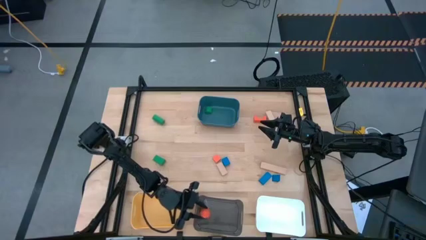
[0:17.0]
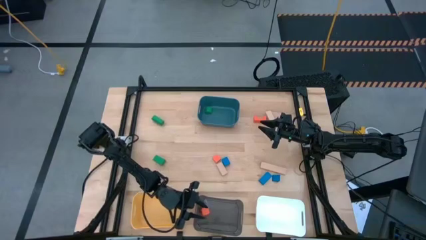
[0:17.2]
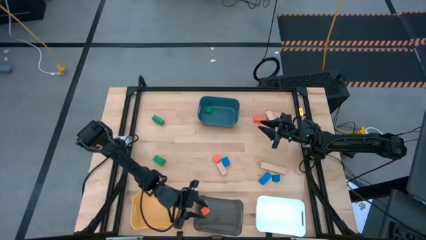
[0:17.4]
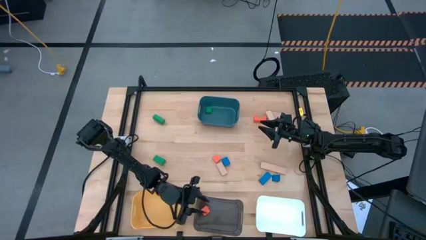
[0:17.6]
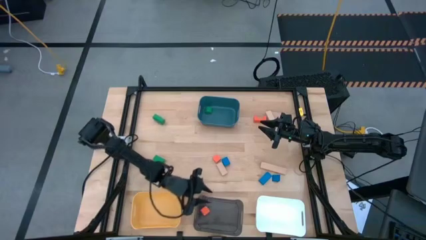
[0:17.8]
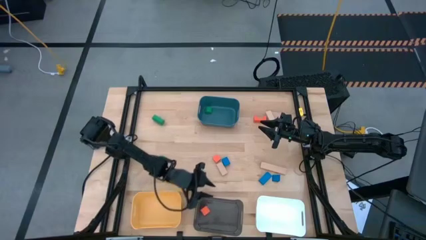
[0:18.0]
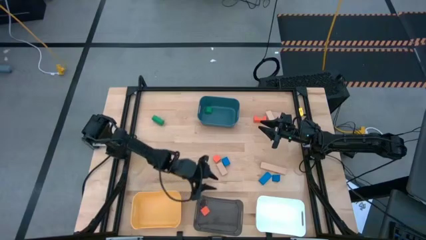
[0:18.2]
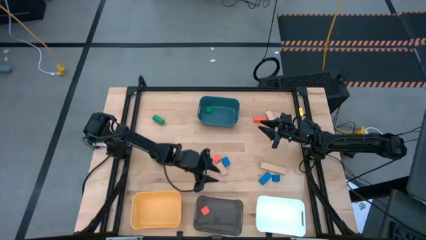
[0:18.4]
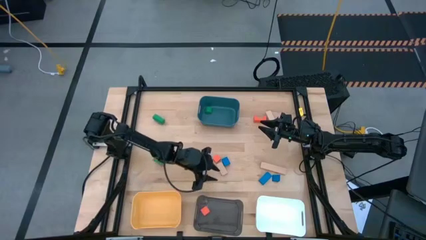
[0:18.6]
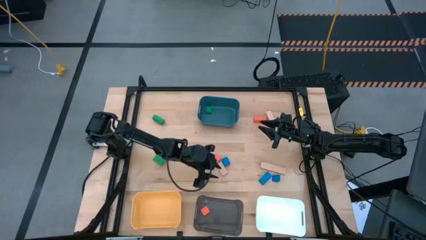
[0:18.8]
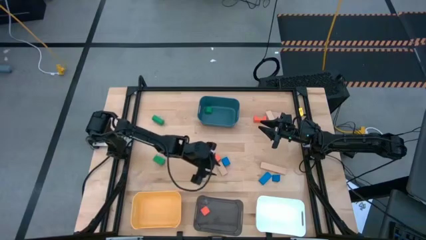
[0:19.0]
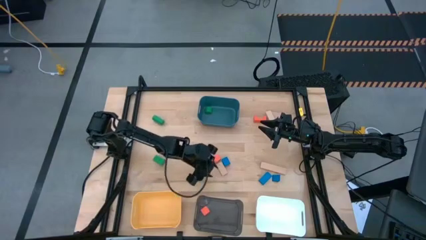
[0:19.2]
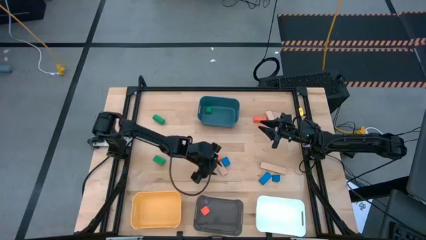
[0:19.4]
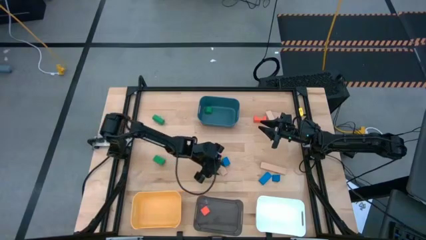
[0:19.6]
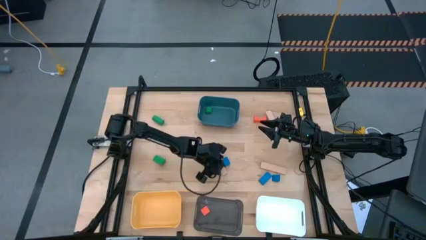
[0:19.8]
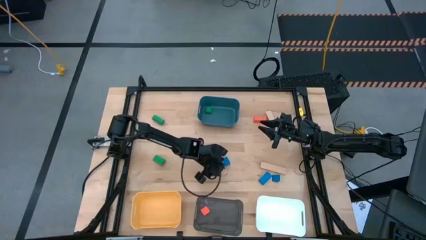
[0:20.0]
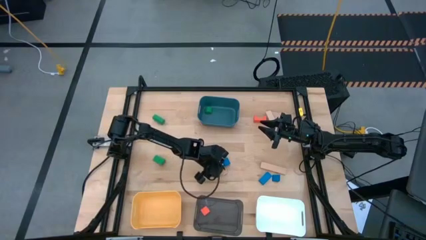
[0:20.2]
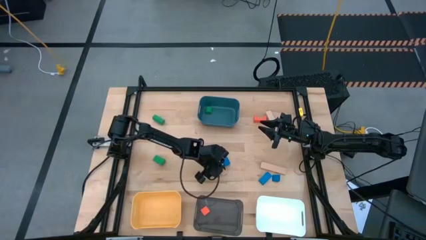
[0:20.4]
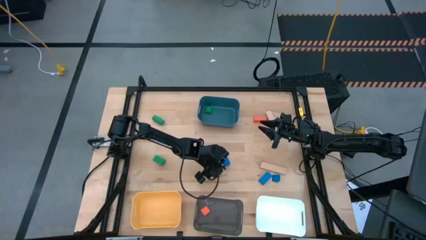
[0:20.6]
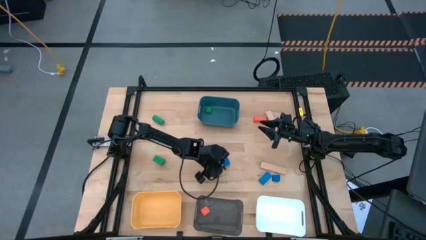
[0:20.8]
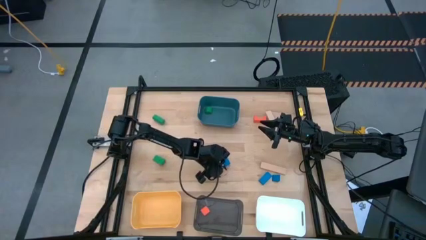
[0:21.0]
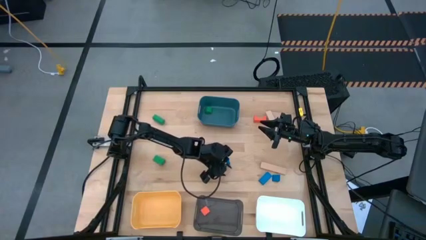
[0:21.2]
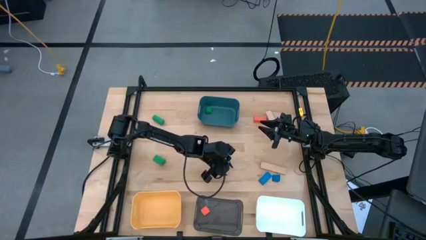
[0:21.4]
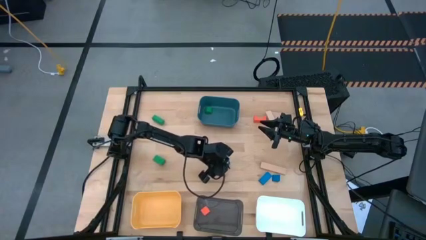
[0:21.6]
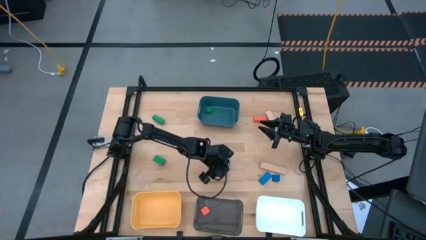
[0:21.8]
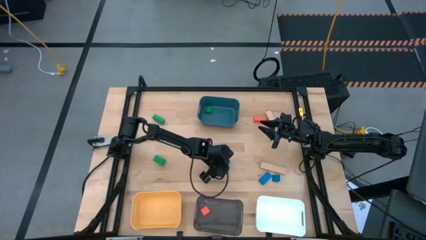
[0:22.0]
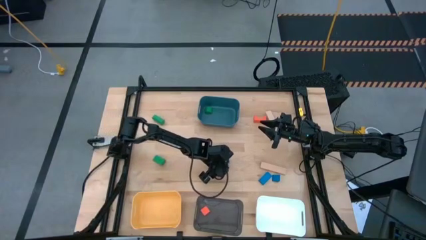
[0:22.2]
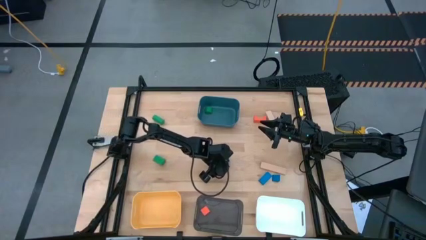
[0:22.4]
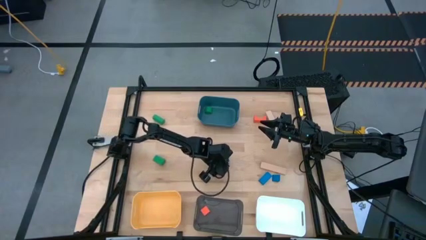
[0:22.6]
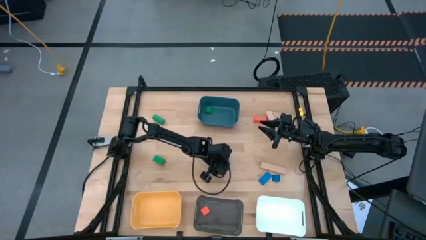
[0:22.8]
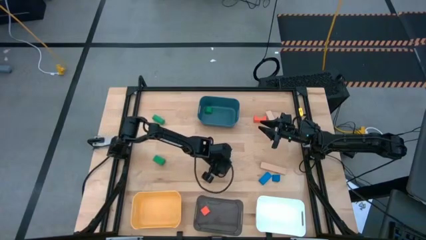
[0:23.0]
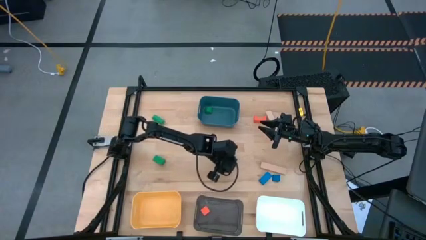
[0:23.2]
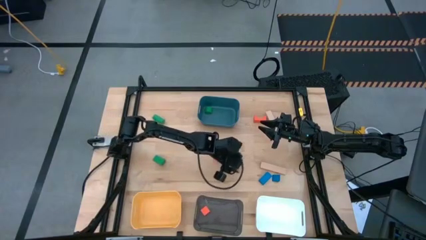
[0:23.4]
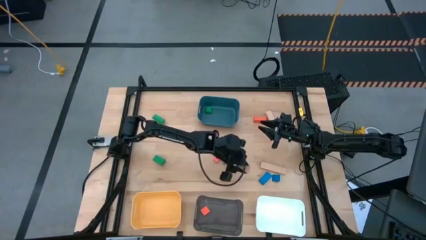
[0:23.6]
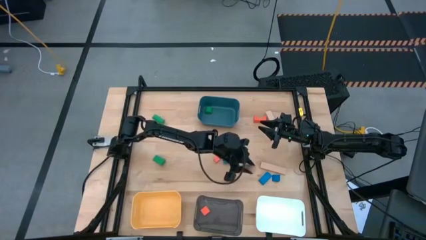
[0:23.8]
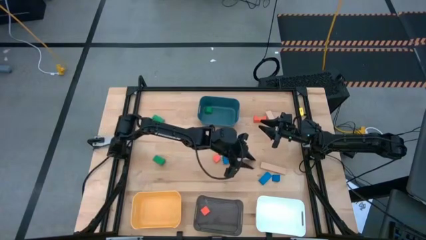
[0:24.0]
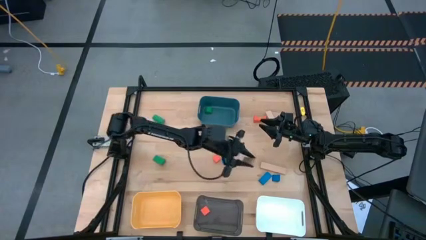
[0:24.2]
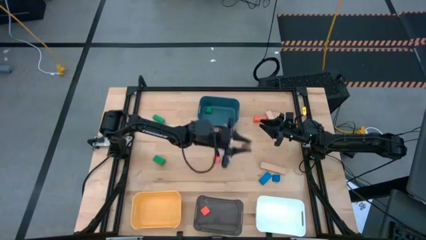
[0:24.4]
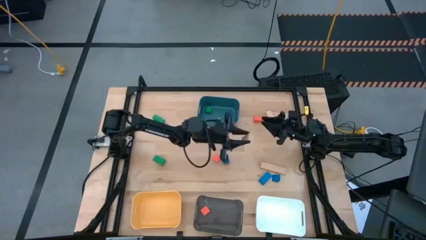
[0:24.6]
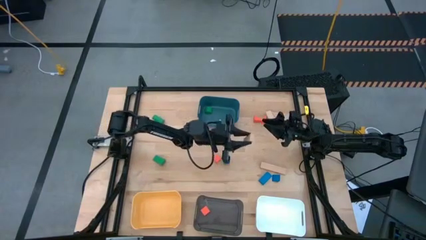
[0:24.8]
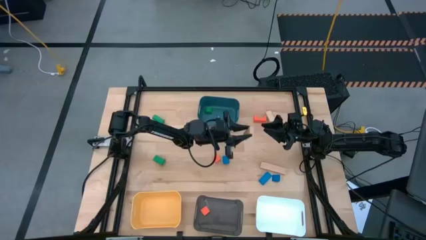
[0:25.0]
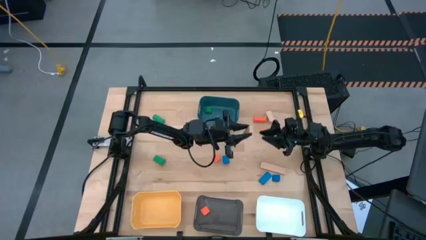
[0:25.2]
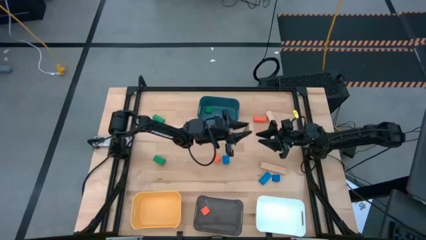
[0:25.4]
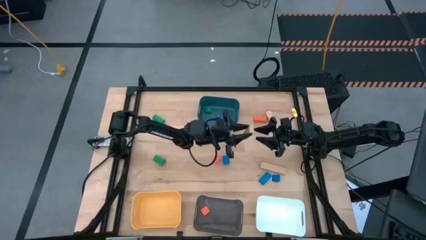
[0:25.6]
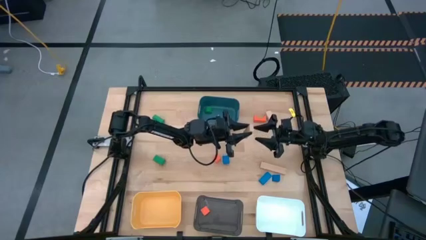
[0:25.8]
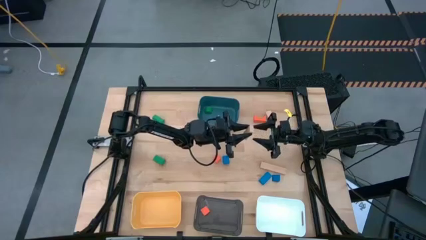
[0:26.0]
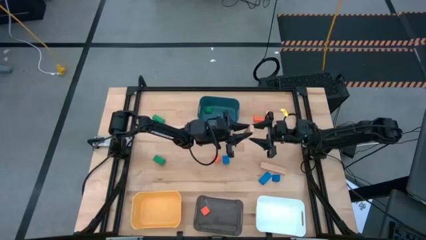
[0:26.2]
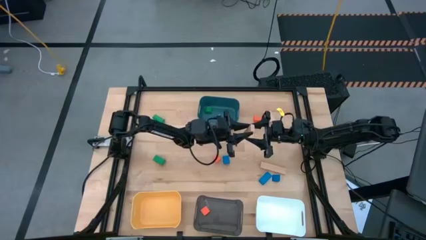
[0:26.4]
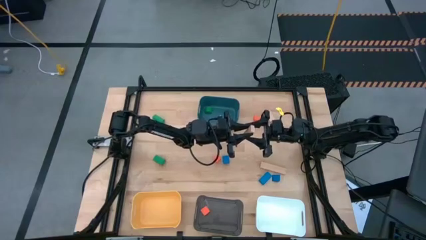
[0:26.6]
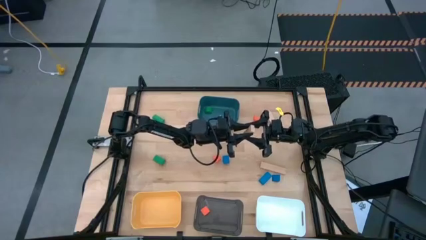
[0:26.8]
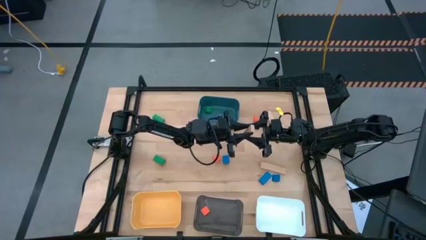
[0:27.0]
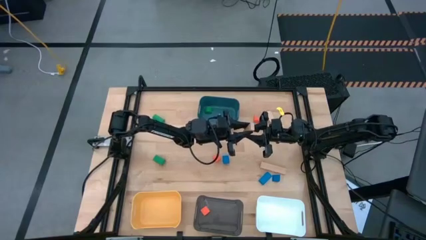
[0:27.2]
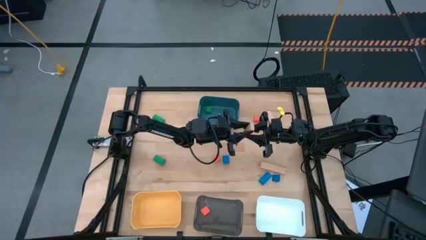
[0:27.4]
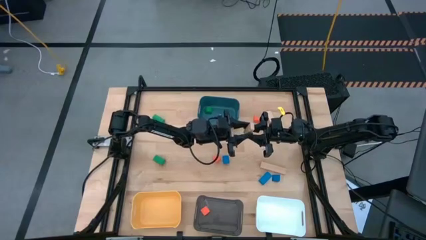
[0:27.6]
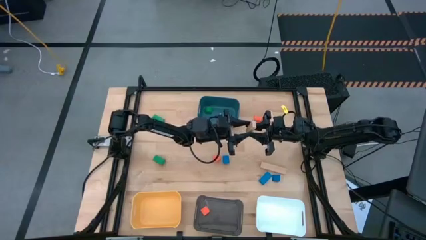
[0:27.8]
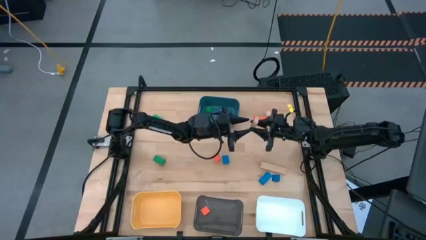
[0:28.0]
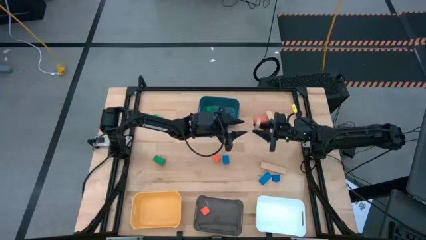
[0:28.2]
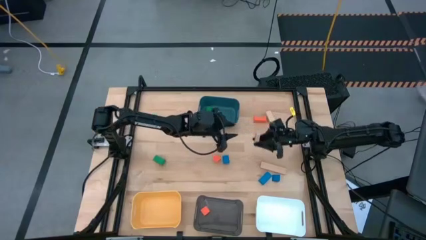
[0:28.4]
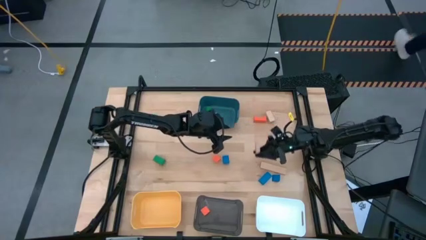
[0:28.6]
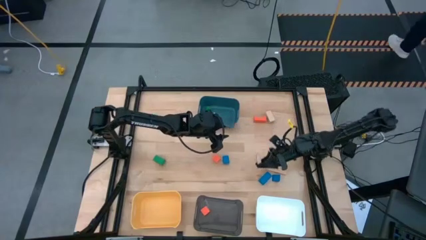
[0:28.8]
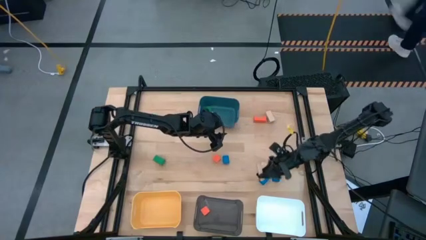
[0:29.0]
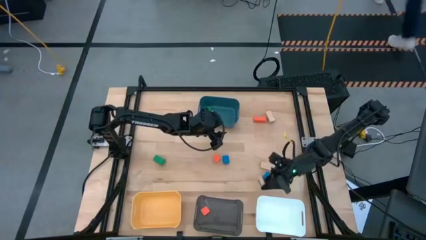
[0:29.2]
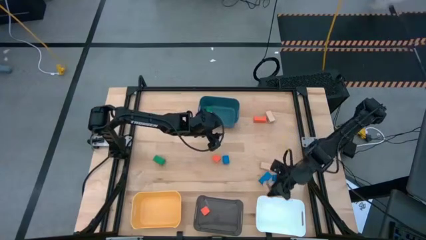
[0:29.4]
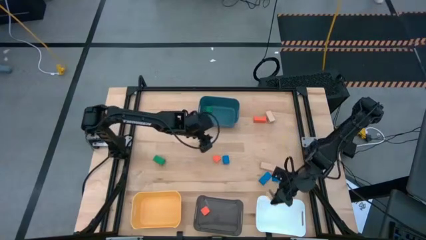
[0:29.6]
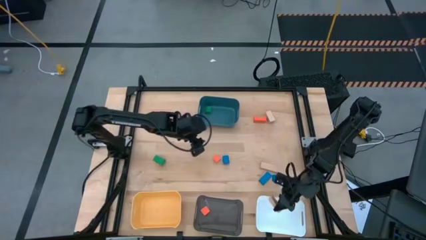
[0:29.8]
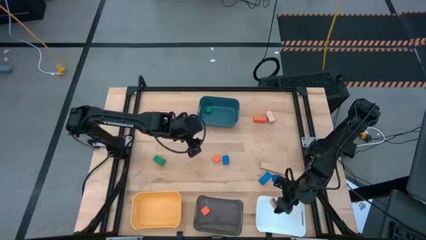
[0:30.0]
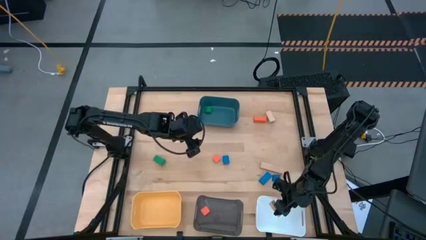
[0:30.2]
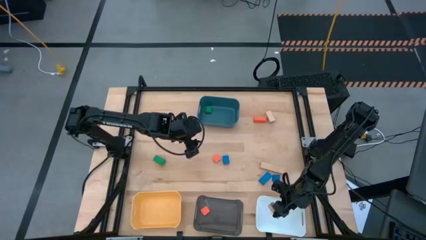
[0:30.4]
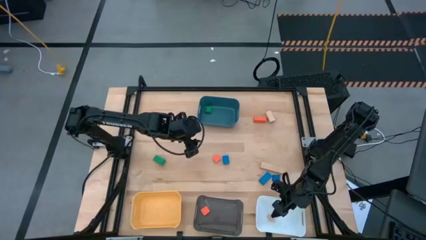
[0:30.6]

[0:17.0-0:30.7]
Task: Sort & place blocks by color
Put the bottom left light brown block into the white bin

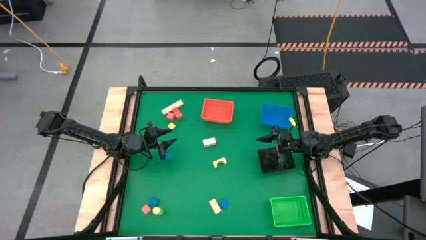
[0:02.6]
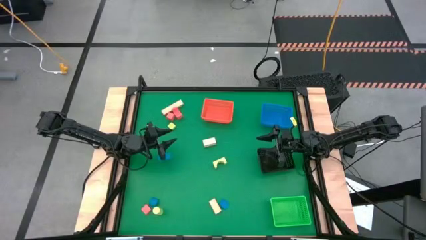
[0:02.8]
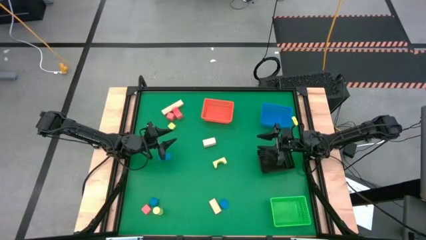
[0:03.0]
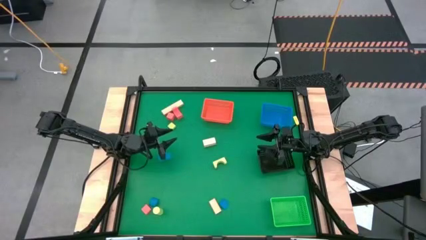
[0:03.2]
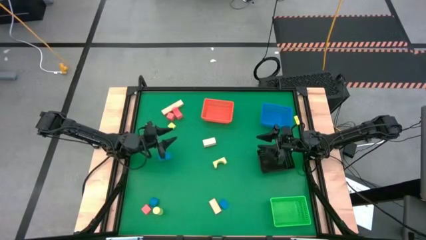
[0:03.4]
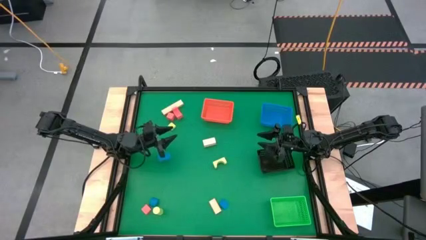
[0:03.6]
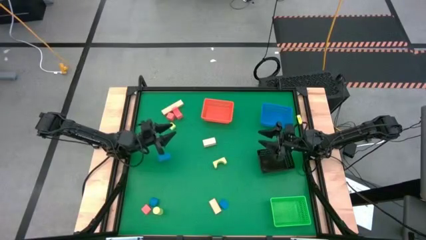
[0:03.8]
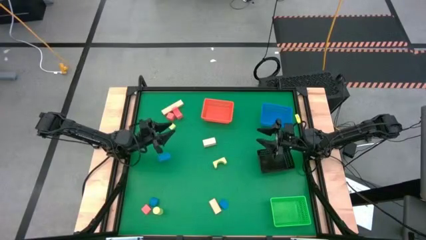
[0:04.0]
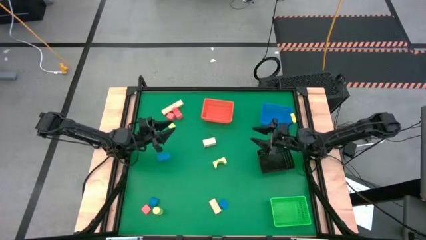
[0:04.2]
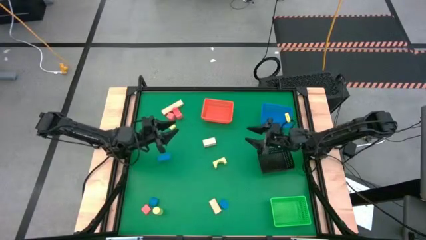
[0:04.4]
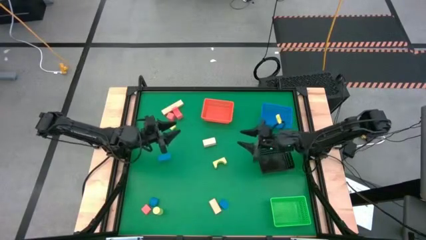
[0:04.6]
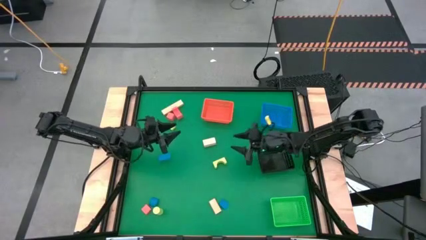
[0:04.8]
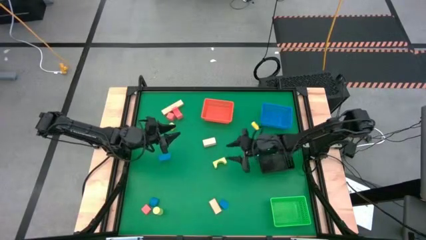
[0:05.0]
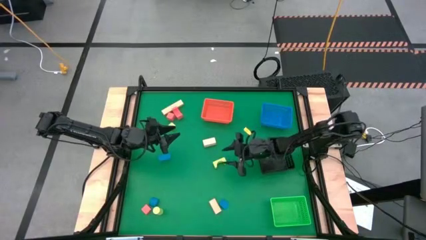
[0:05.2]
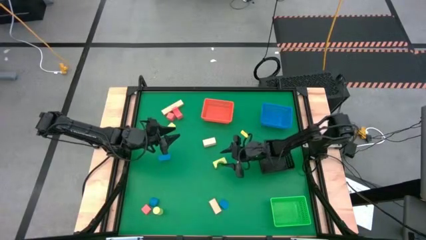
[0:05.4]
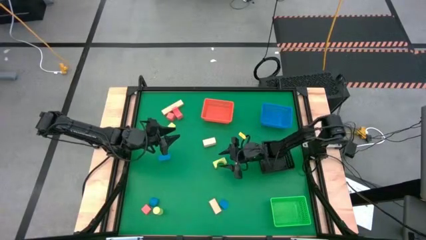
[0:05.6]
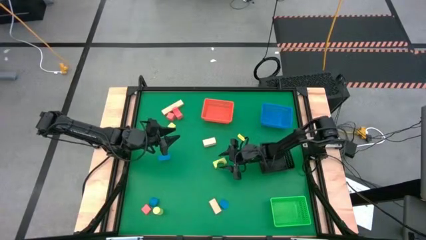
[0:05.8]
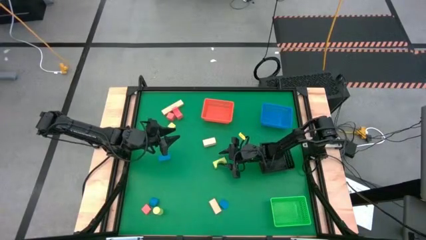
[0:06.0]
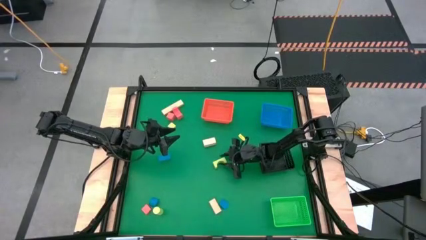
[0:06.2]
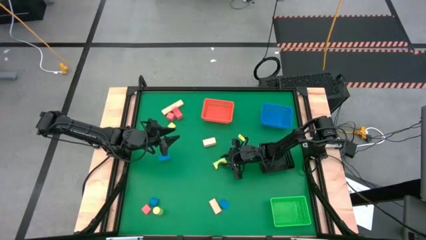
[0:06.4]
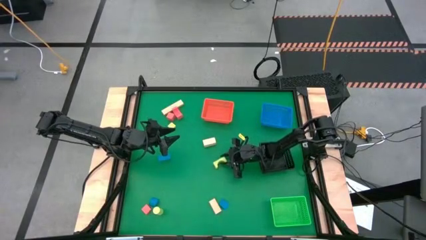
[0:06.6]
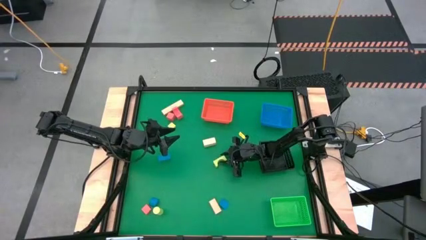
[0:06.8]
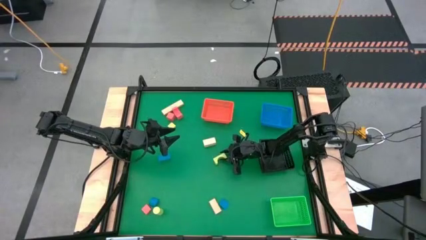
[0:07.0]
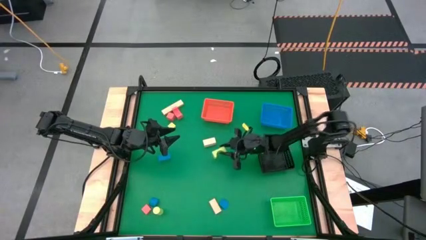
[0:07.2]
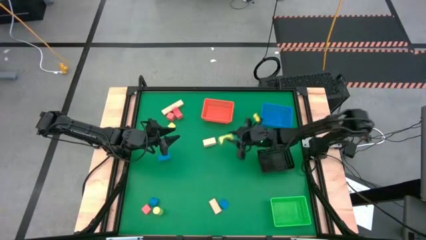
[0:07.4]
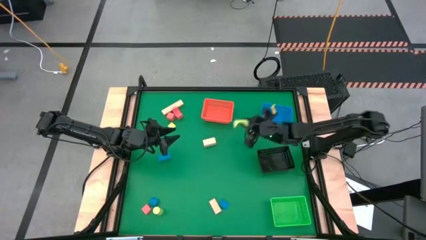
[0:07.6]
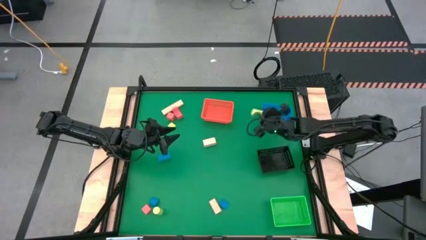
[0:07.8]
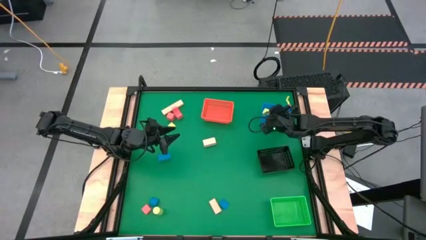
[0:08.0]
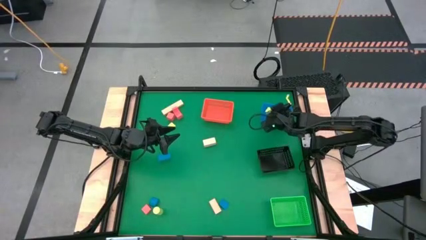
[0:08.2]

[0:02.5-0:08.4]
Task: Sort & place blocks by color
Put the middle green block into the blue bin
